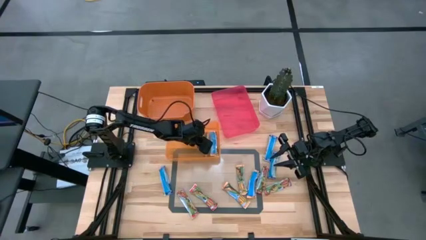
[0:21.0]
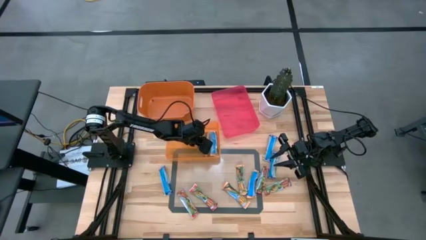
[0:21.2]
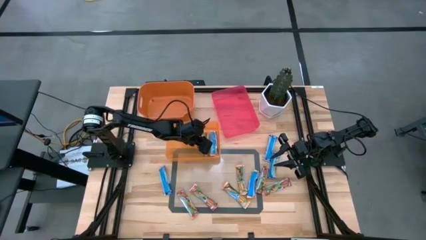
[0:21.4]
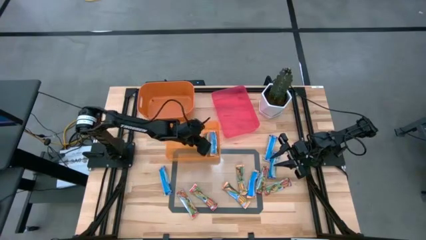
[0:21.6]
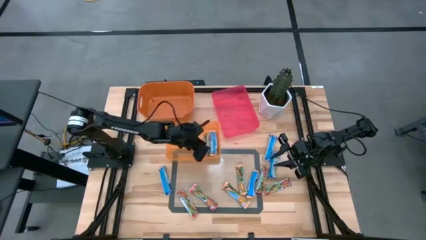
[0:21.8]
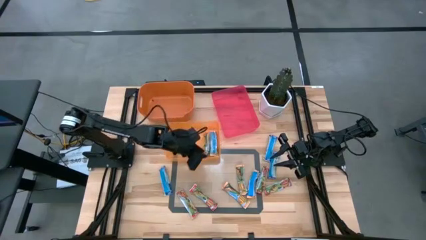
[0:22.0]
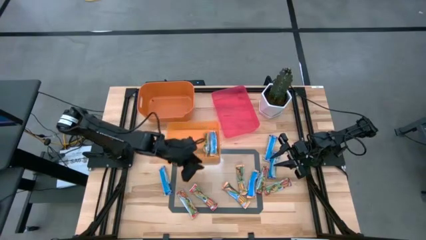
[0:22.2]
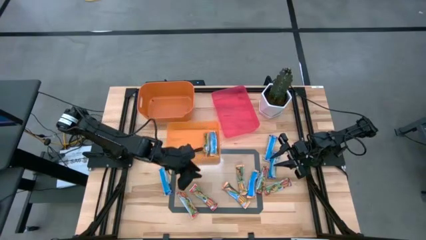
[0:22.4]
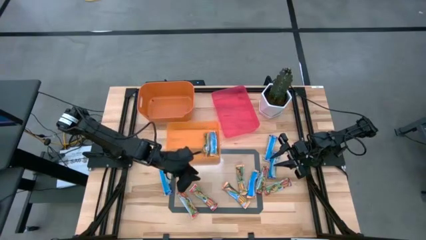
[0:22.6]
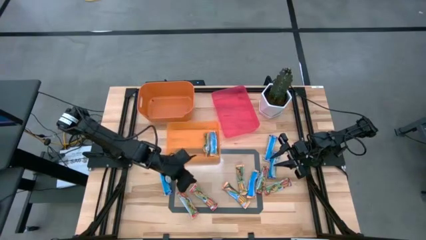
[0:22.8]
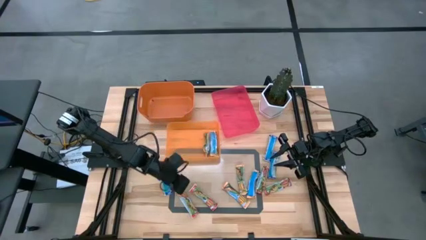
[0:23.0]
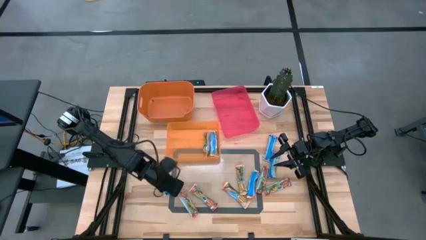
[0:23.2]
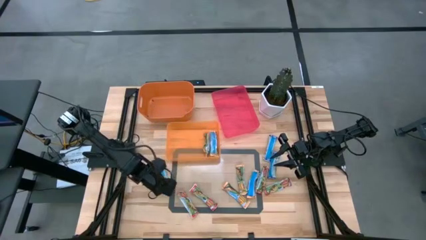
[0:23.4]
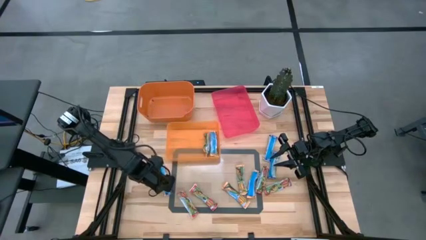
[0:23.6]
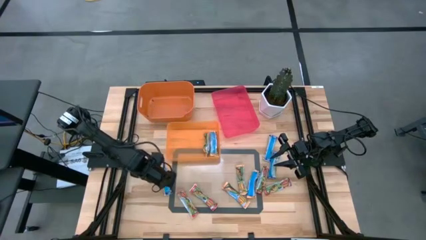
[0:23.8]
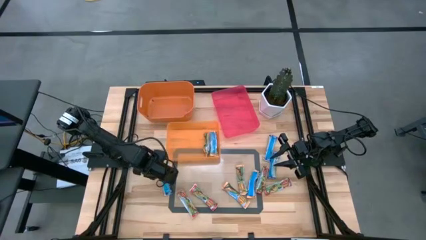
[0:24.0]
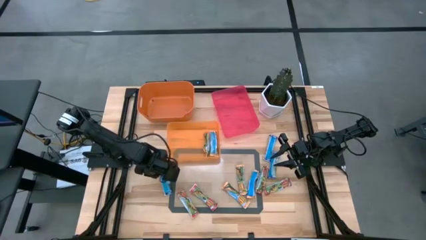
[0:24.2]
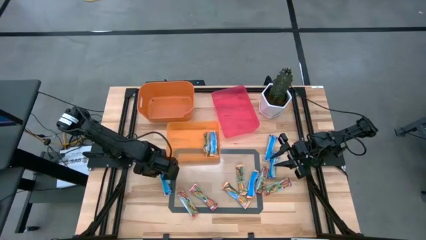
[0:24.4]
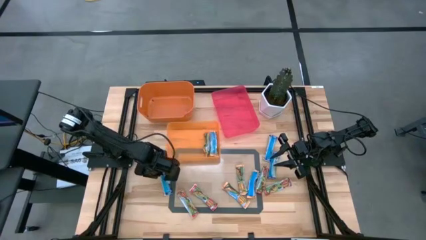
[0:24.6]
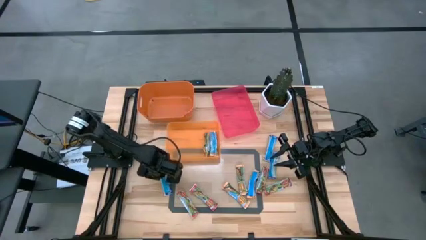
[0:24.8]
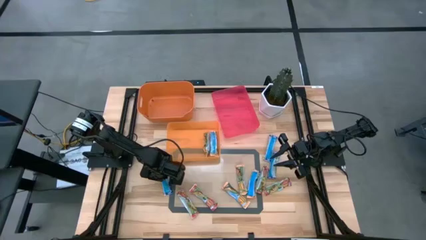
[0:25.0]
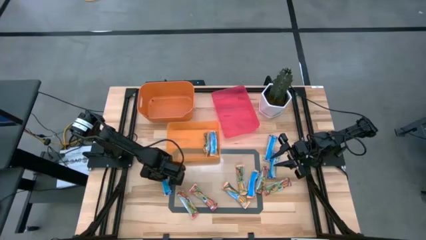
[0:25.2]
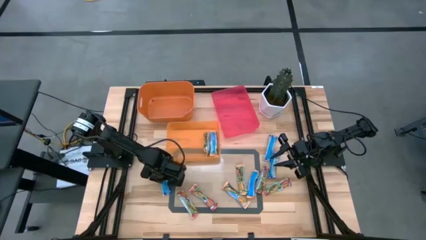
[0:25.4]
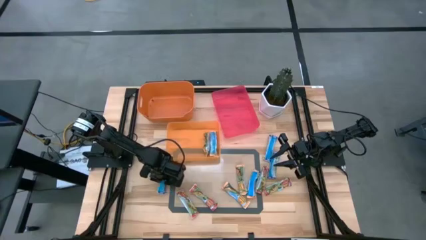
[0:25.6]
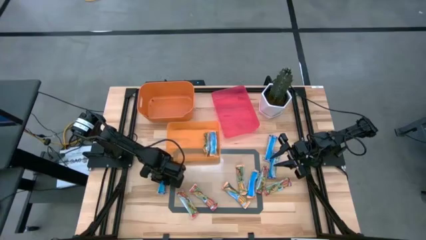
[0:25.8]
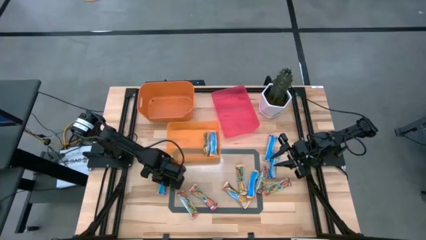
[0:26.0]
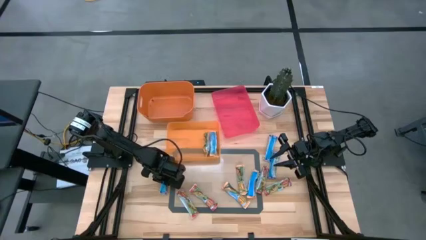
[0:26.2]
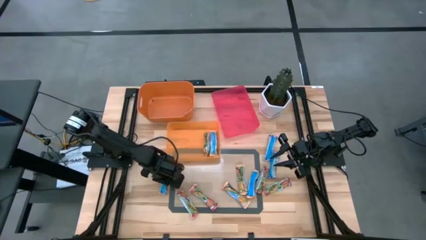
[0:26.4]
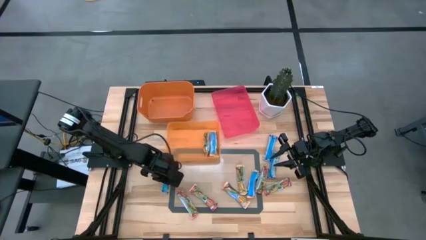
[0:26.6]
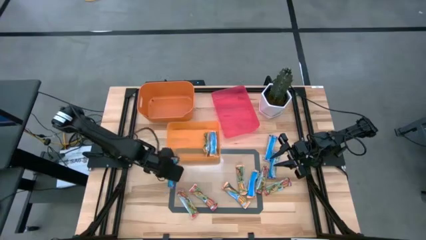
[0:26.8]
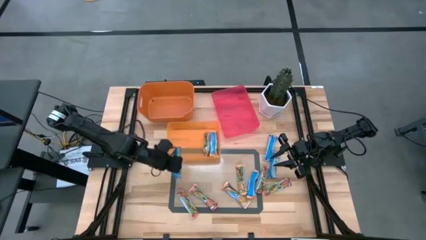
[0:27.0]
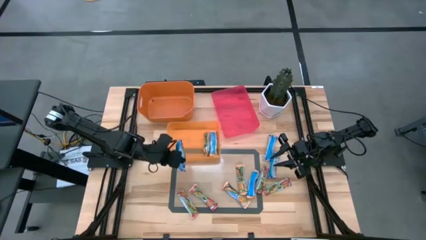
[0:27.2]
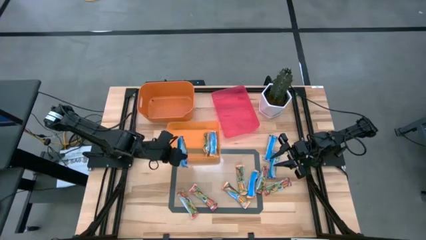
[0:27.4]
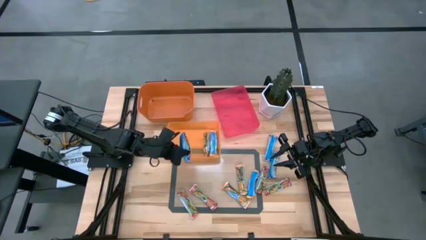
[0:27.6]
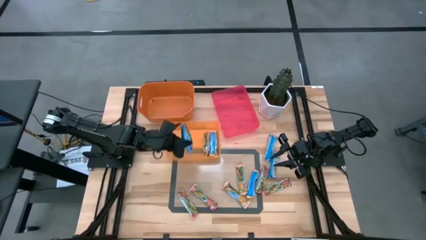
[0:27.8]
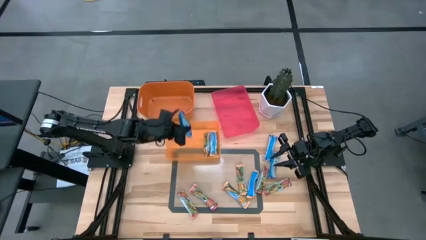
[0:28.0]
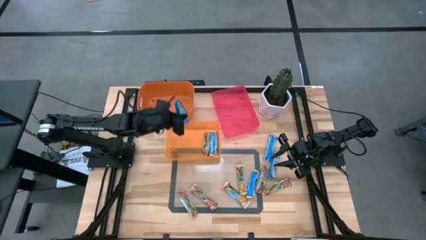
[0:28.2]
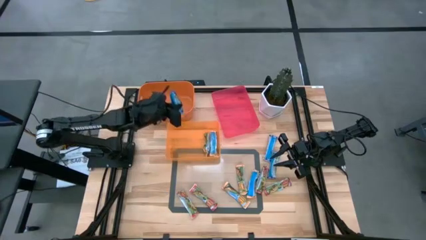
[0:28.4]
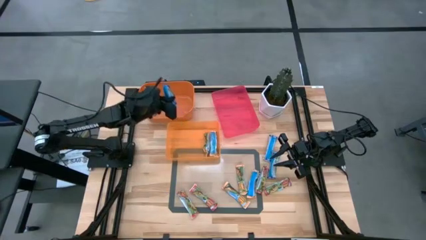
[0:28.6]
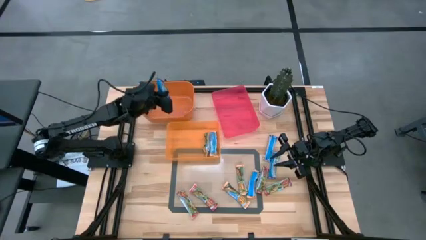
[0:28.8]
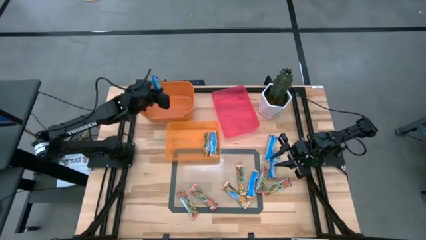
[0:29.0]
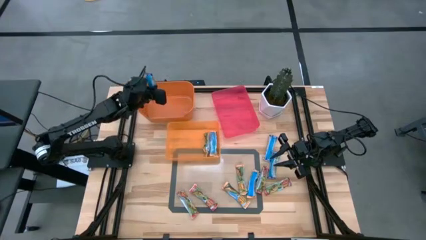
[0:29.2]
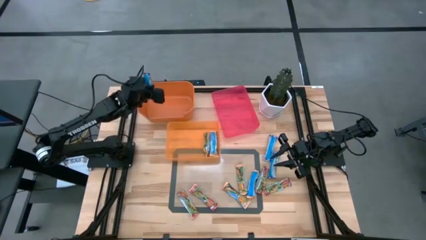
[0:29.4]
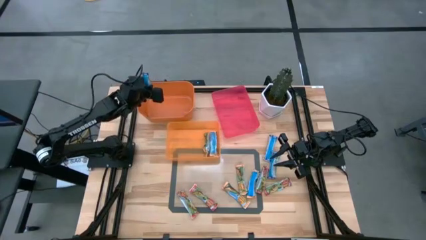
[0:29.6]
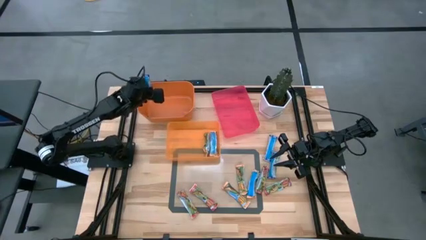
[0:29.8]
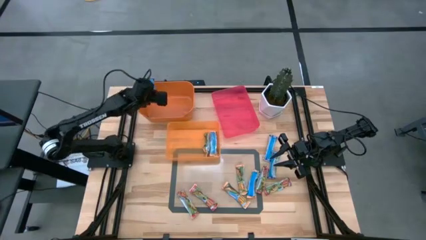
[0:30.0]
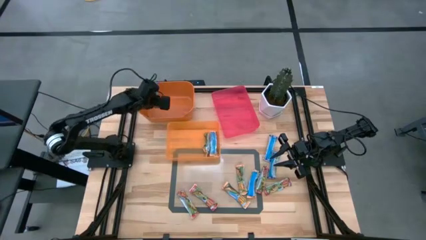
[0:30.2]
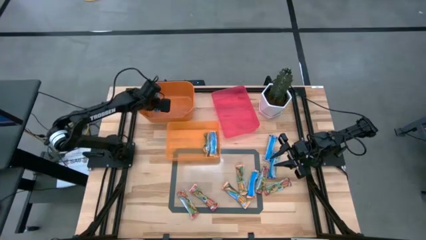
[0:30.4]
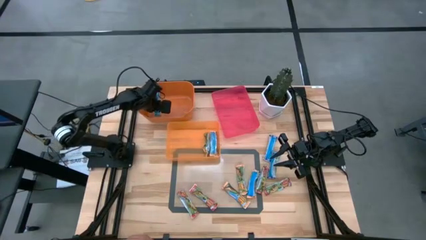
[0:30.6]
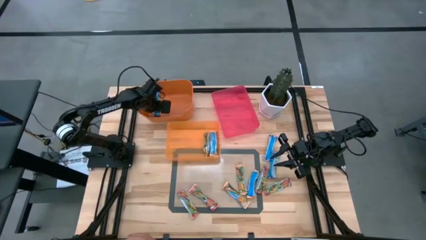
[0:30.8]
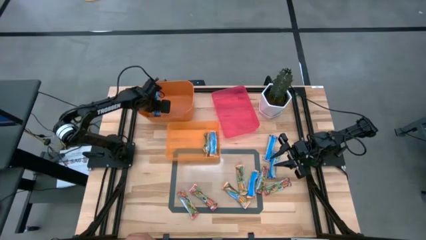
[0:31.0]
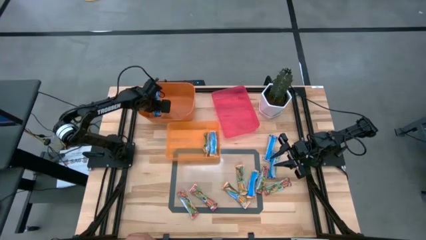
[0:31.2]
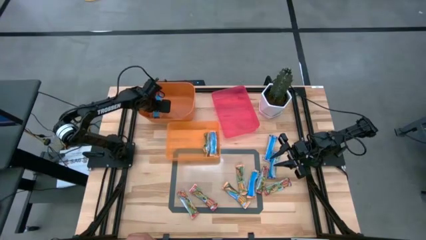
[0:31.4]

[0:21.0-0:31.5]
Task: Pick and place Granola Bars by type
Put the blue granola bar into the top orange bin

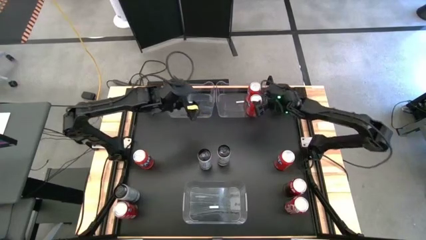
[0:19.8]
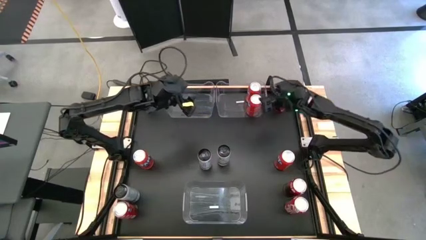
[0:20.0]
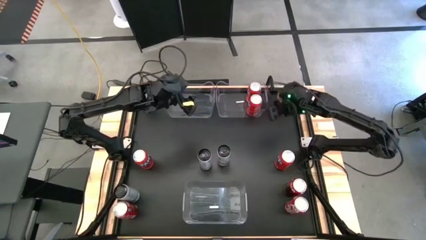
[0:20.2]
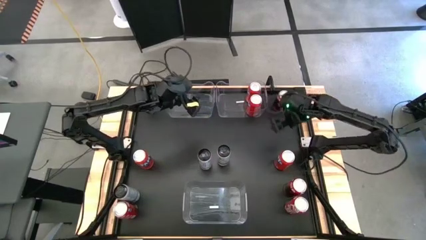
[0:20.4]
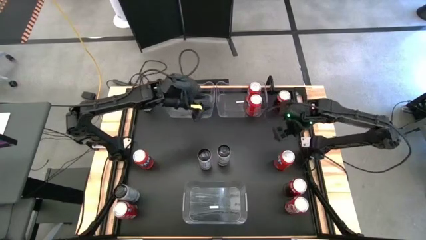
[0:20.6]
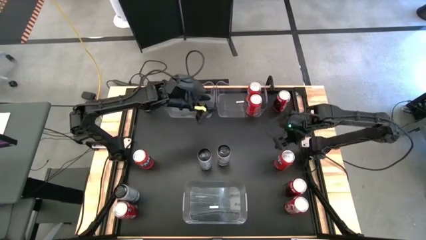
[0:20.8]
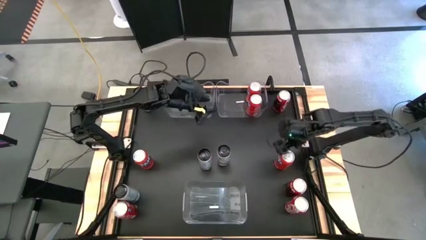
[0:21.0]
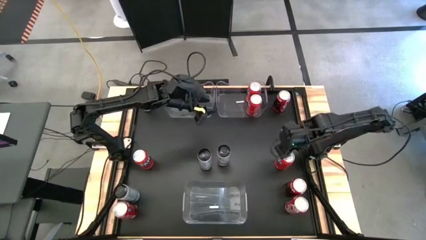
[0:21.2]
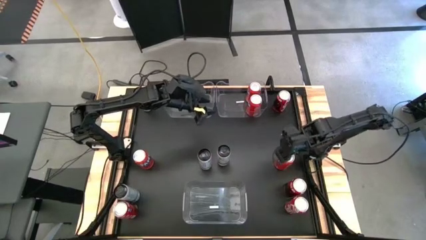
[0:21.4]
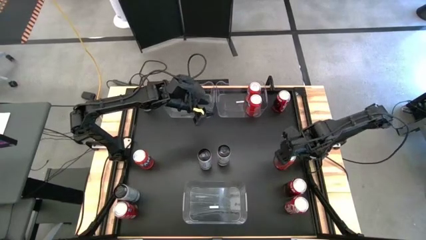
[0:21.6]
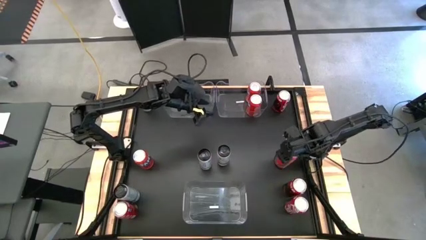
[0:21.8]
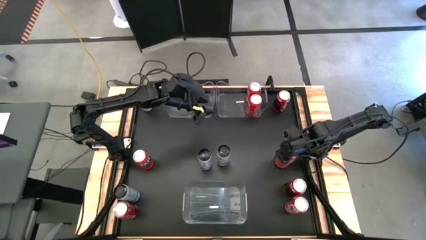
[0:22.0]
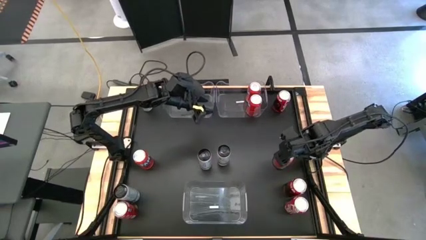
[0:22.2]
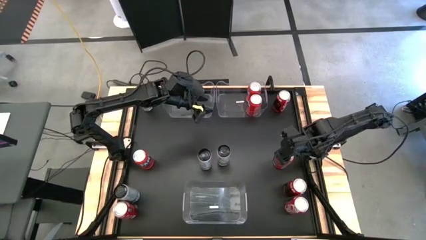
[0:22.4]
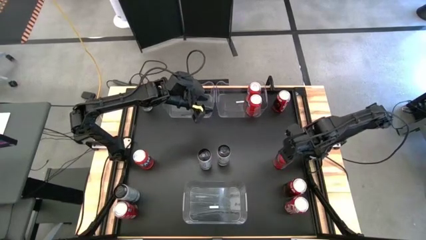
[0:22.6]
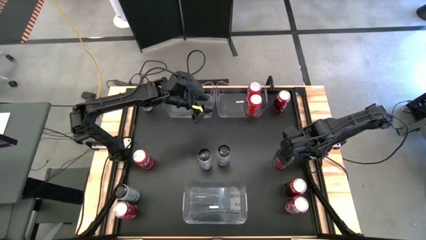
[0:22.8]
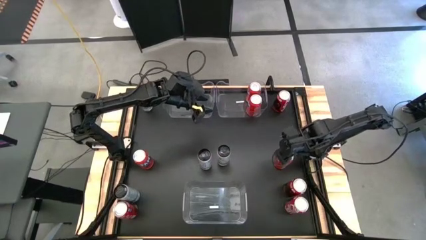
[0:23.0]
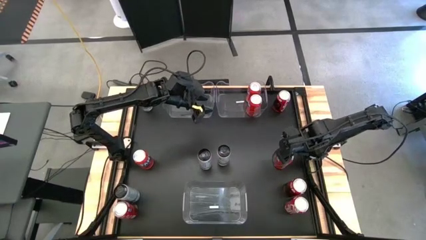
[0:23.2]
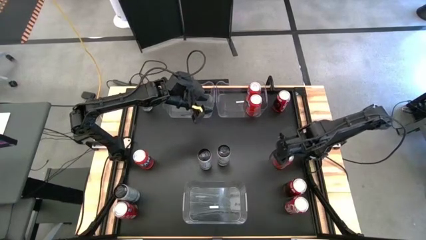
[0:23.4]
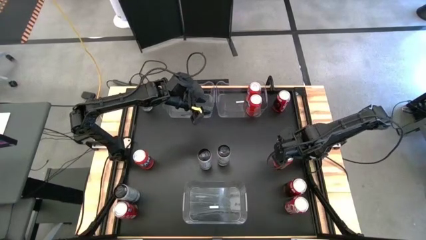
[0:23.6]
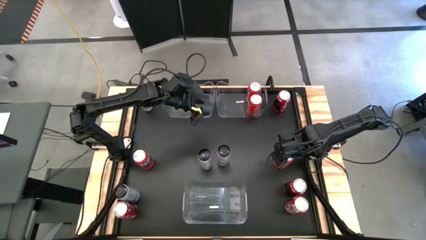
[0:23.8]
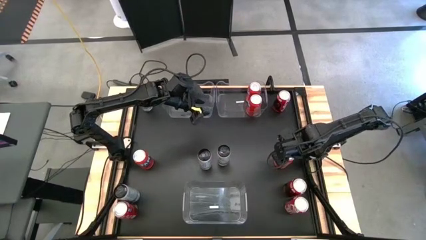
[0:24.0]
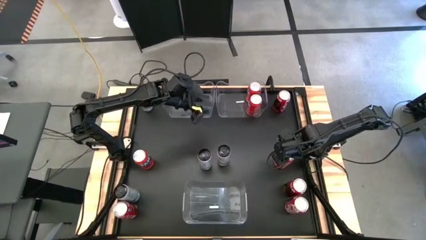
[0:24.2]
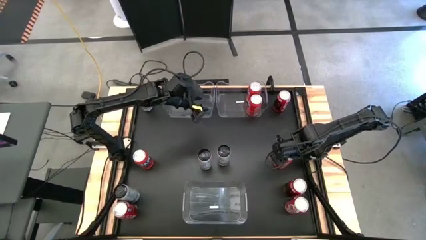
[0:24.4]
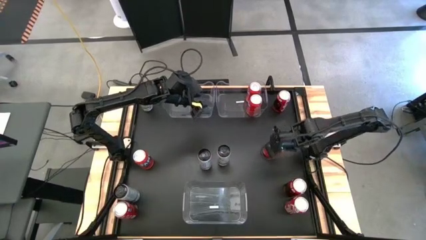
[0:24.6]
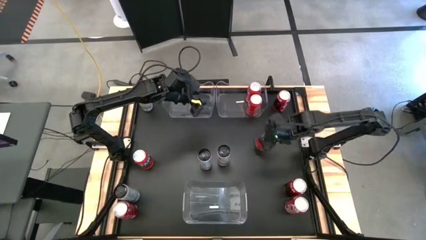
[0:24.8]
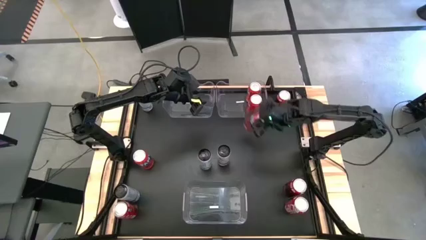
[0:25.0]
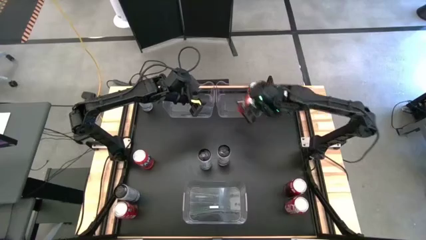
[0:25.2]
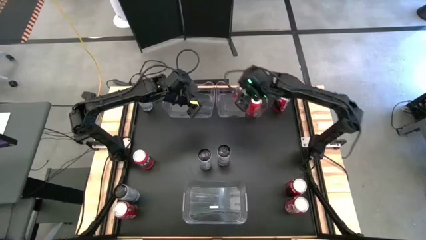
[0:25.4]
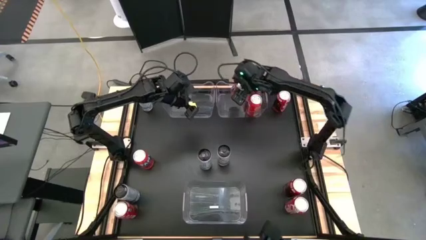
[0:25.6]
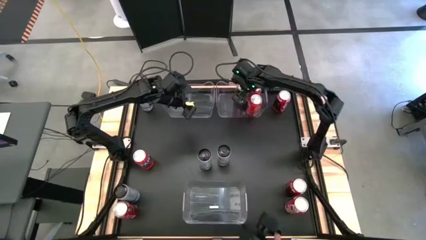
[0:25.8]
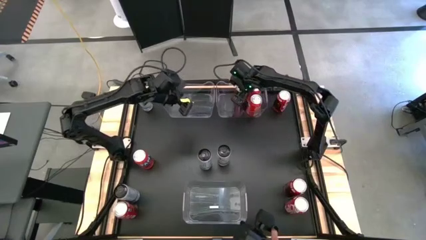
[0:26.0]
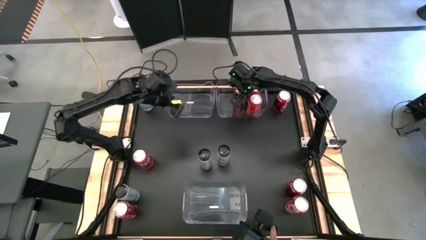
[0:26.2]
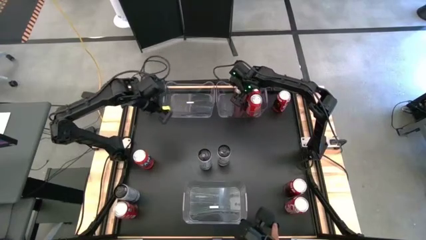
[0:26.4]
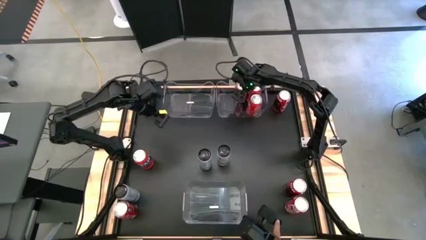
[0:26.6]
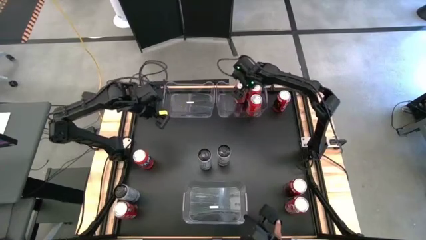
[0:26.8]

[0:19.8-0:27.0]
Task: Sort soda cans
Put the right orange soda can into the top right transparent bin
